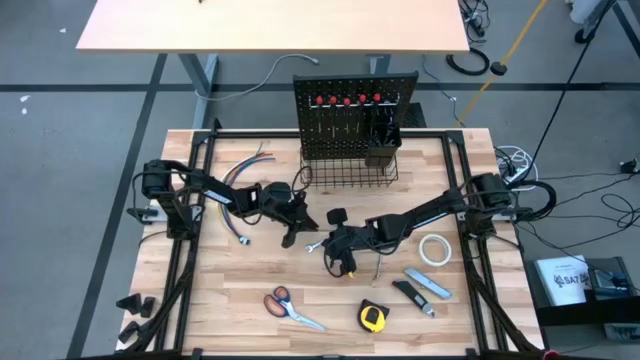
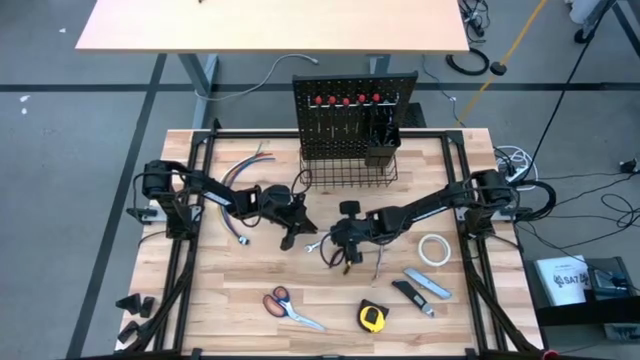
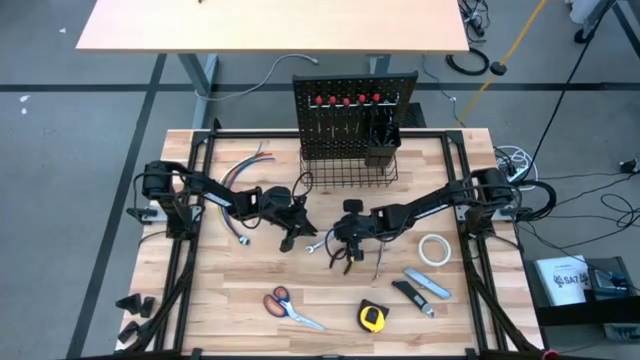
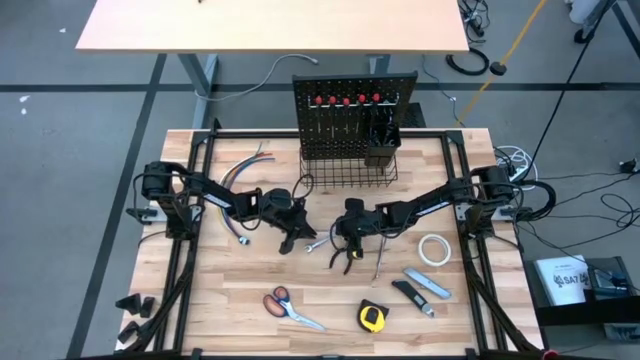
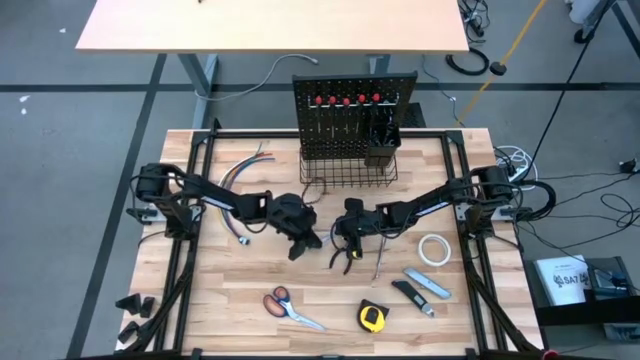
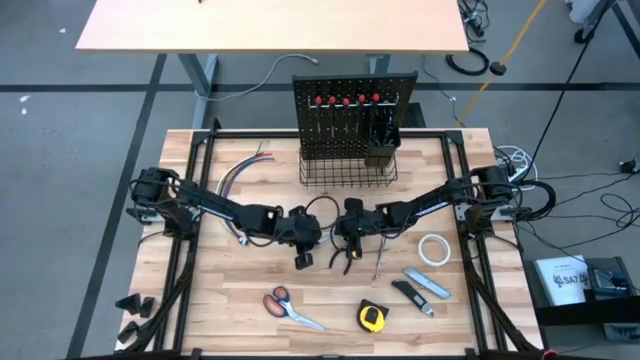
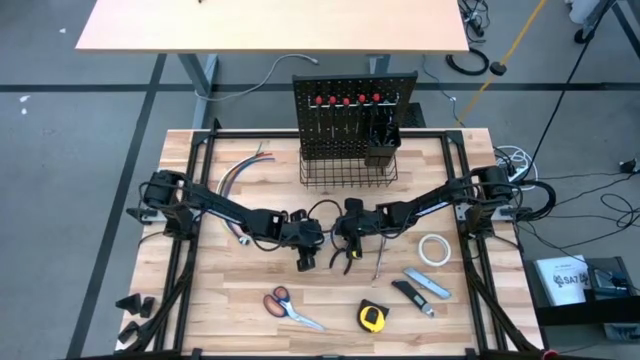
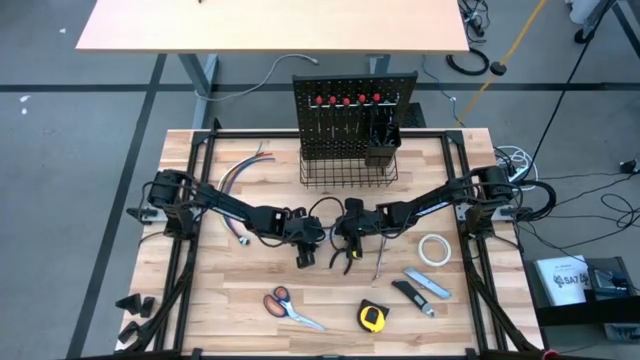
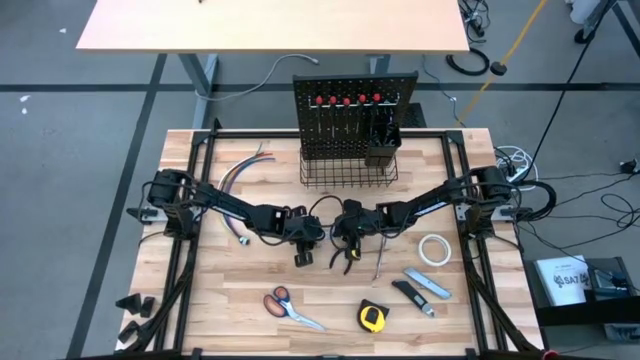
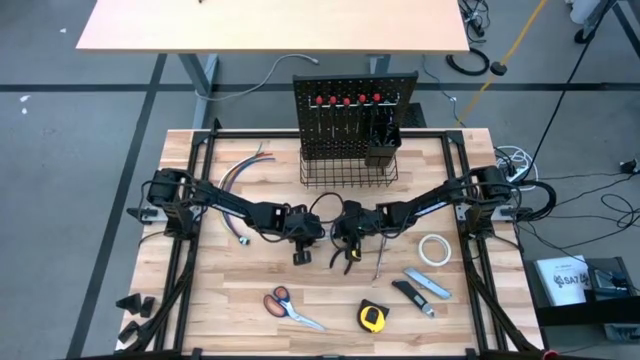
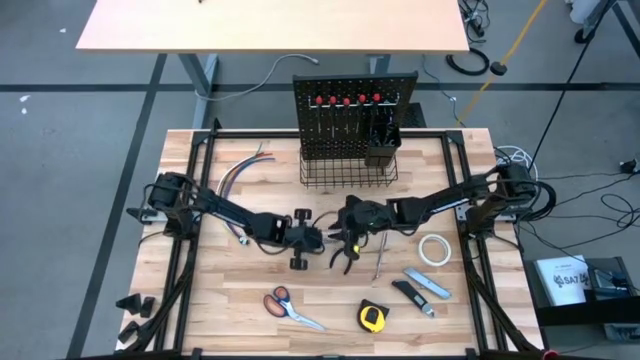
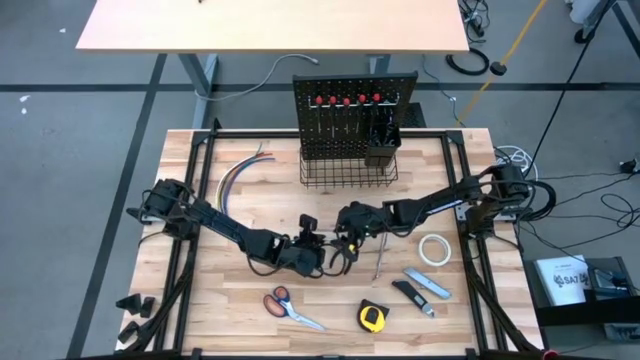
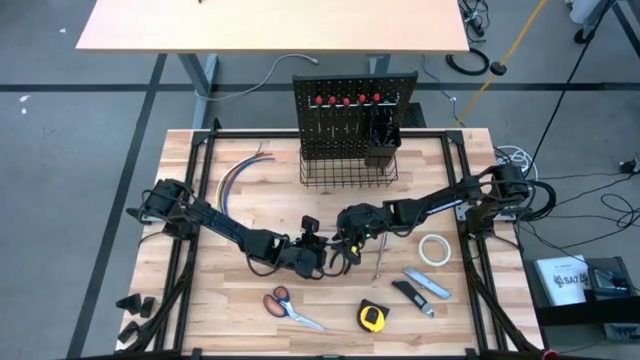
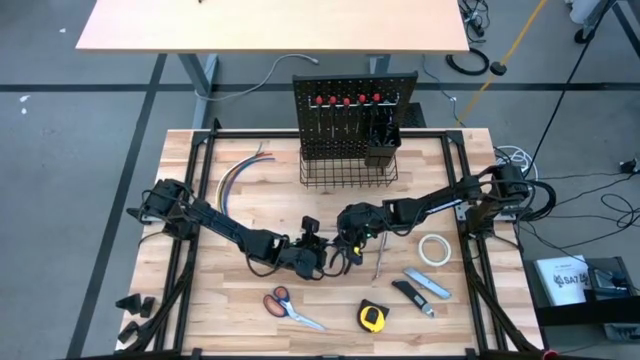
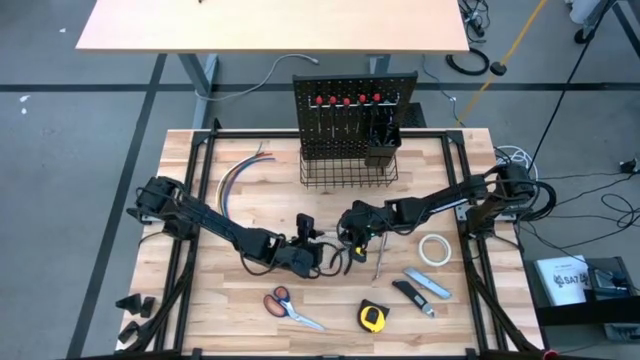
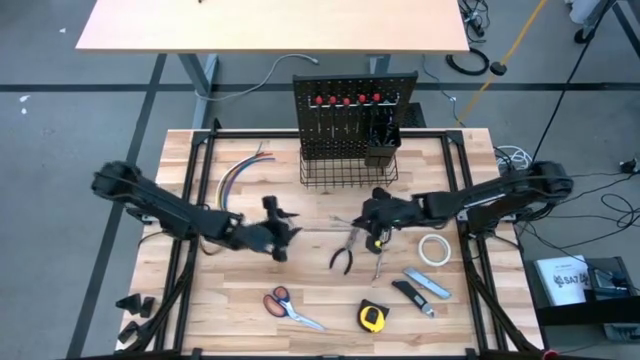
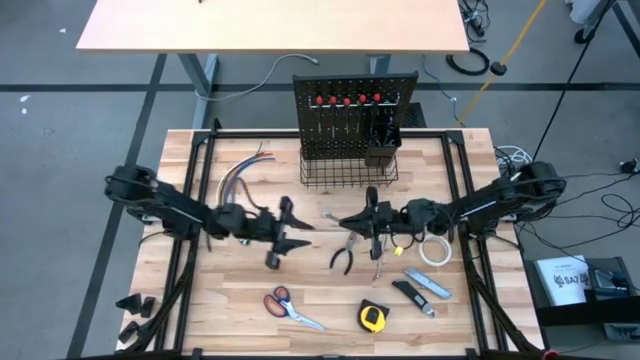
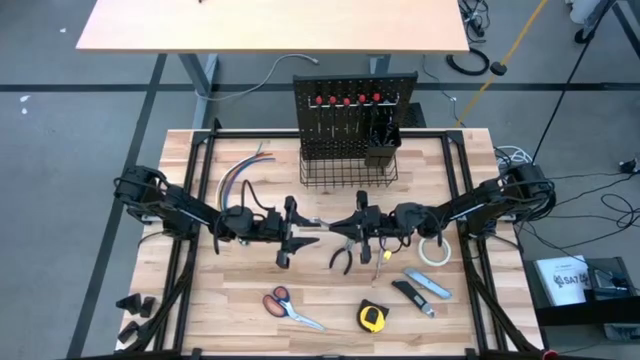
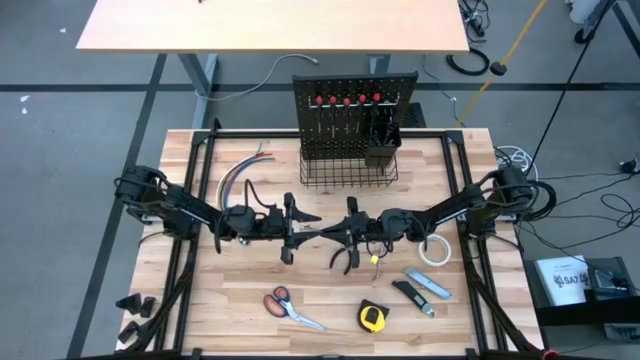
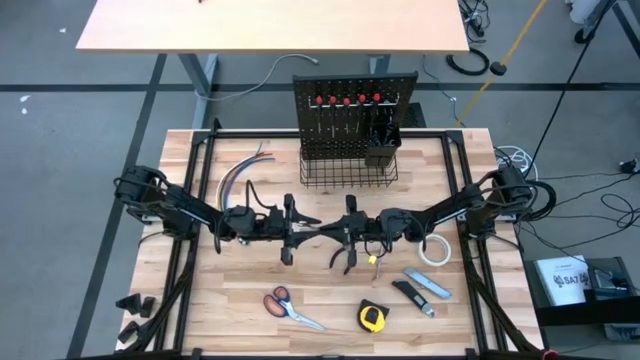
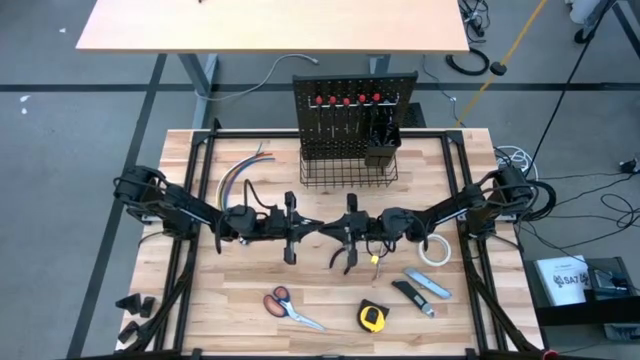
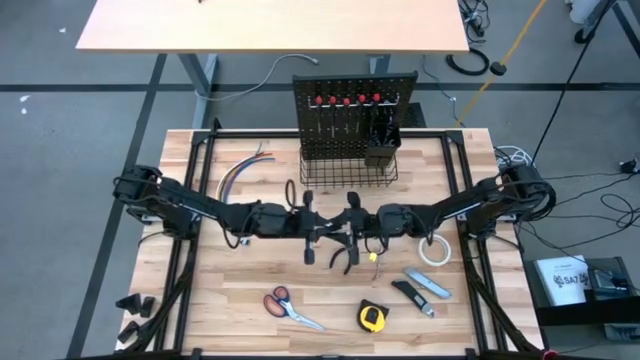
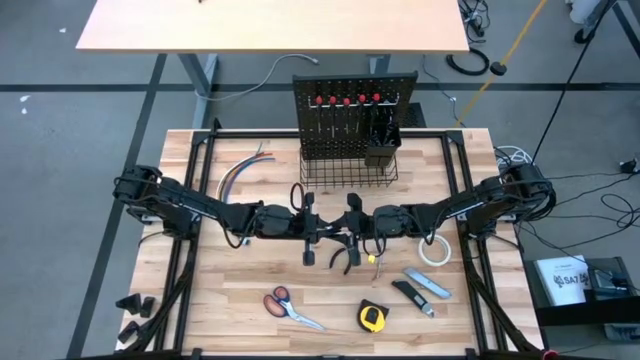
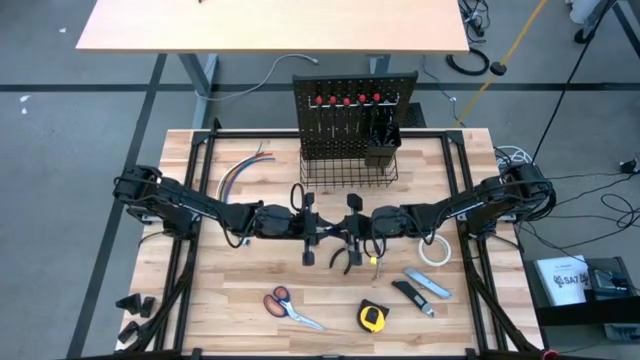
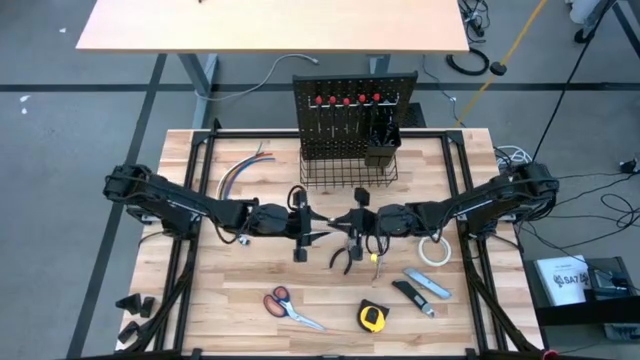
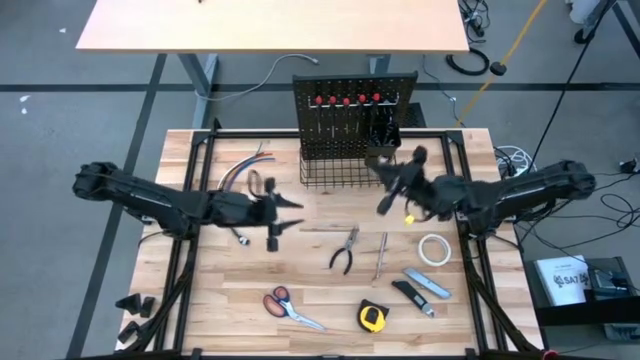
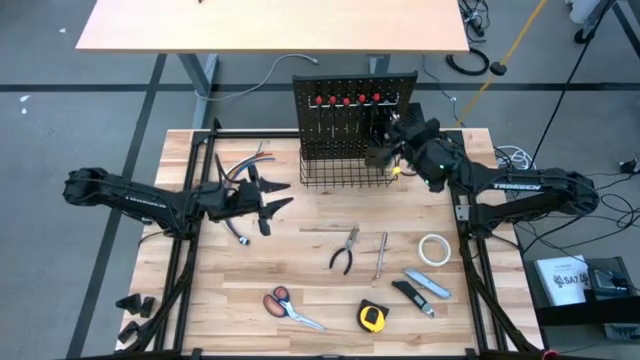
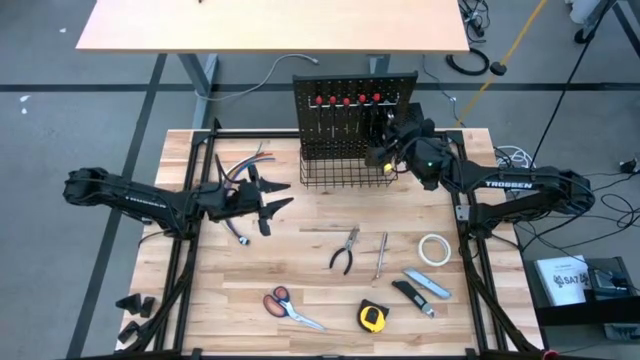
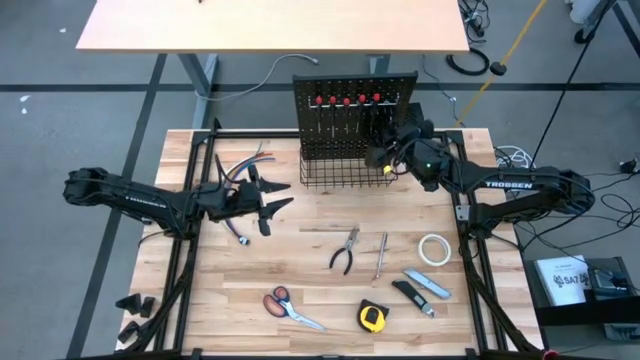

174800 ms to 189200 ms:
Task: Hang tools onto peg board
Put the wrench into the black bin on the pegboard

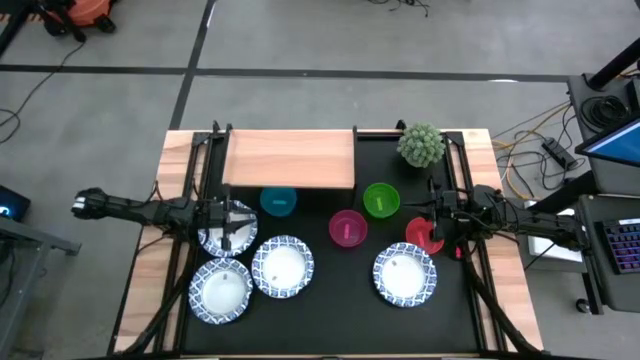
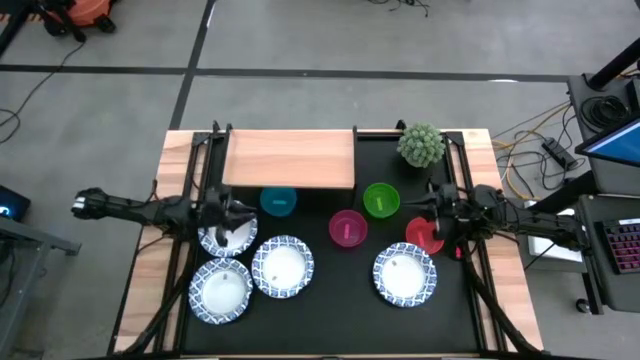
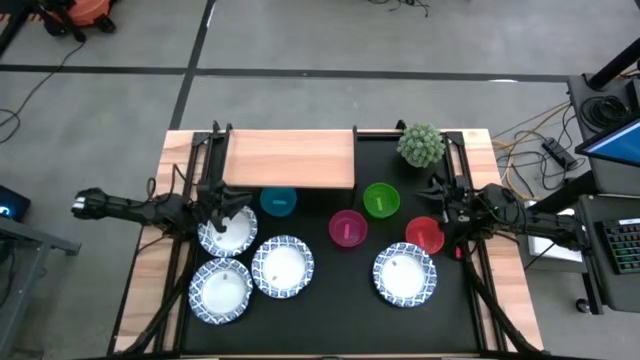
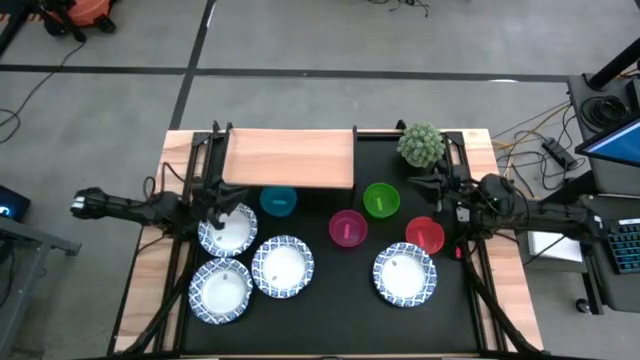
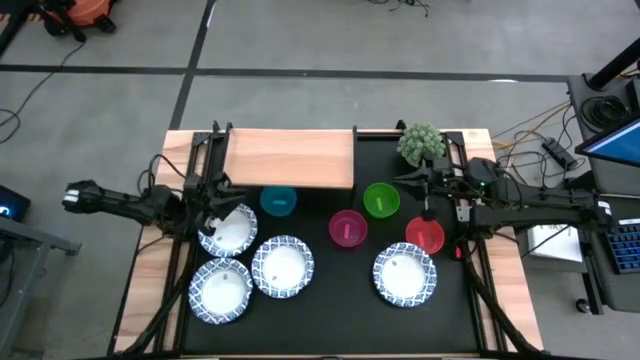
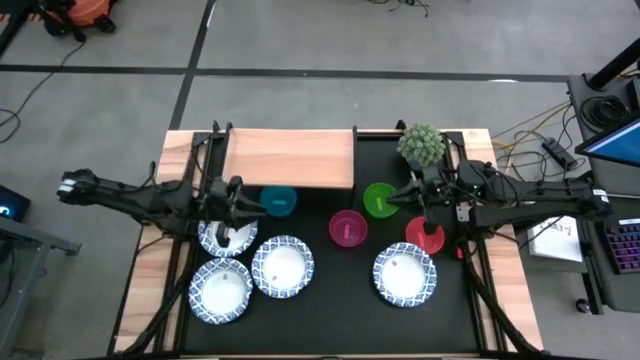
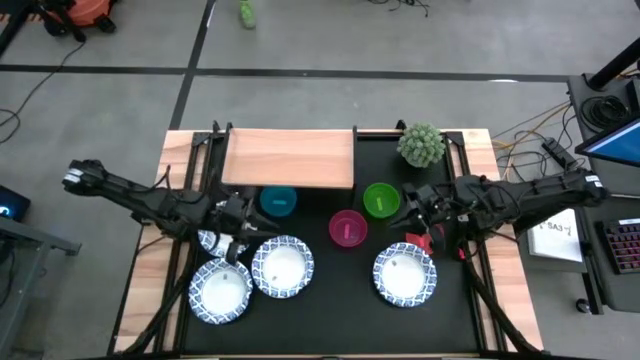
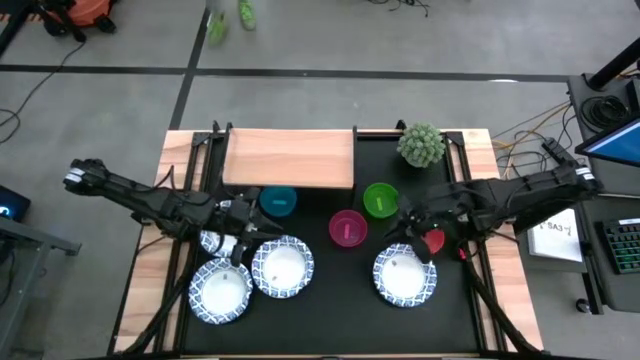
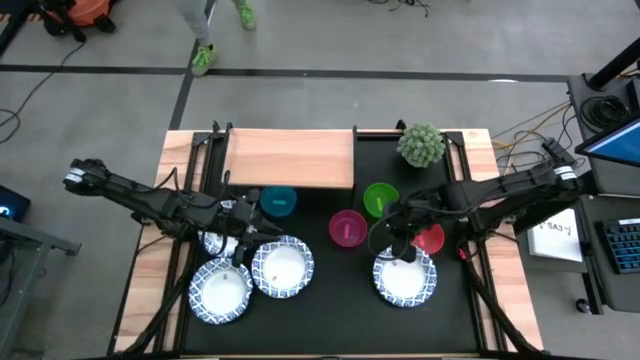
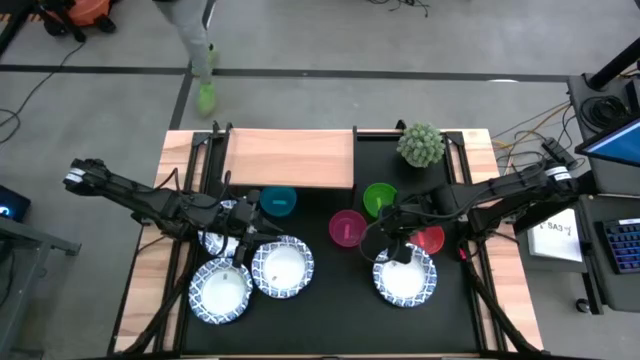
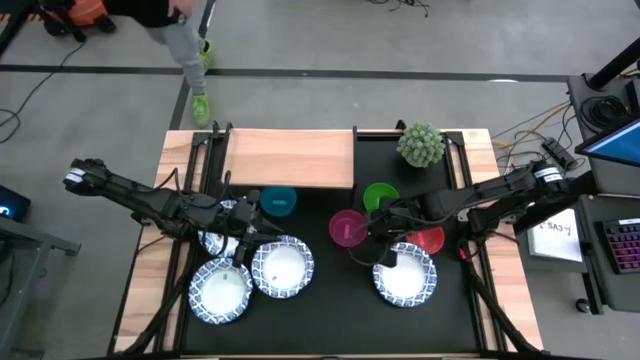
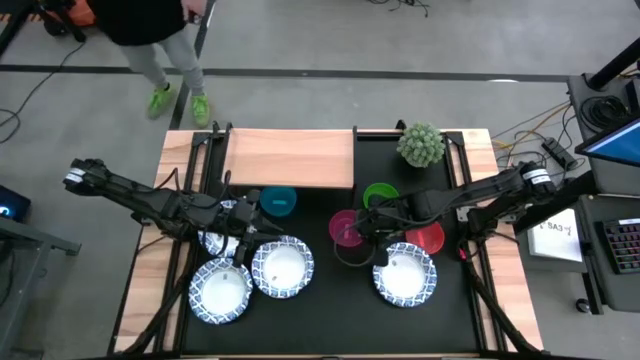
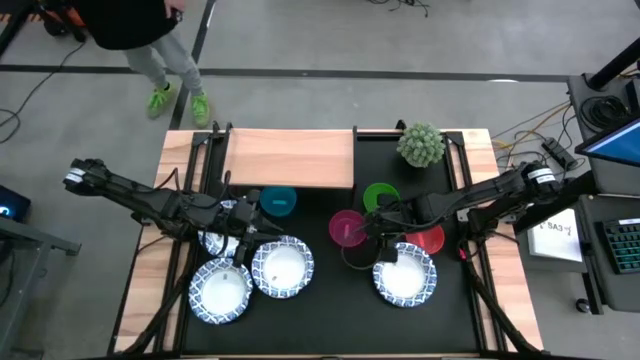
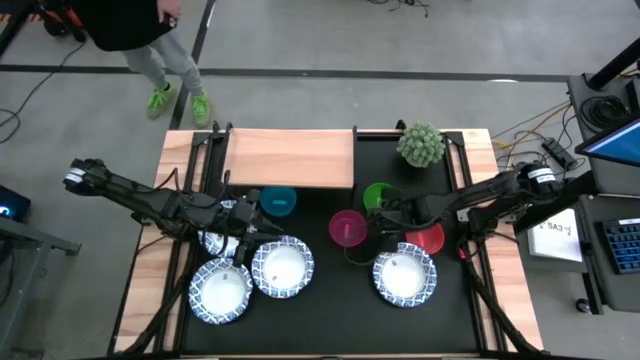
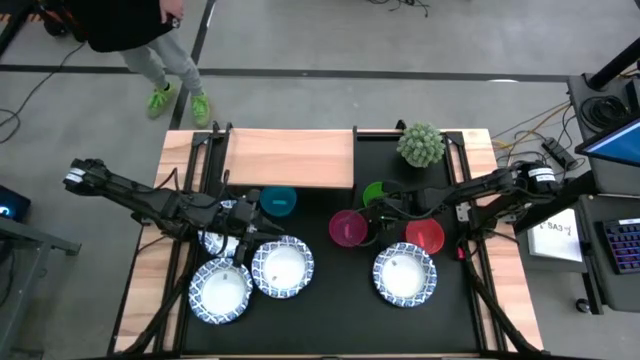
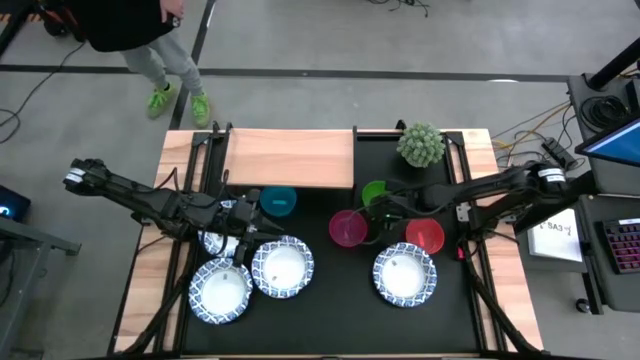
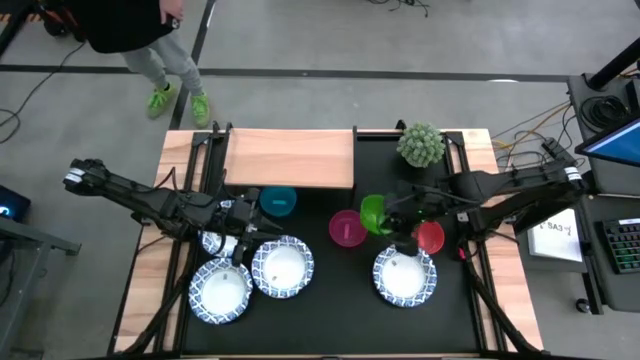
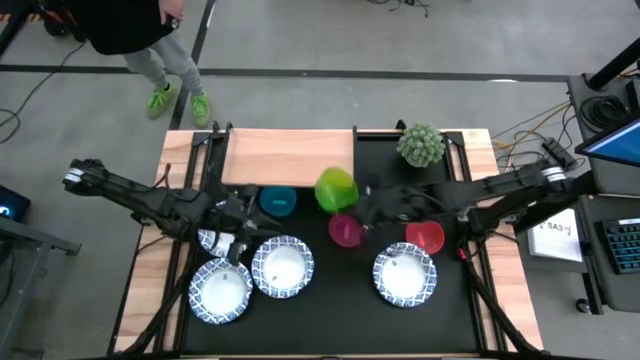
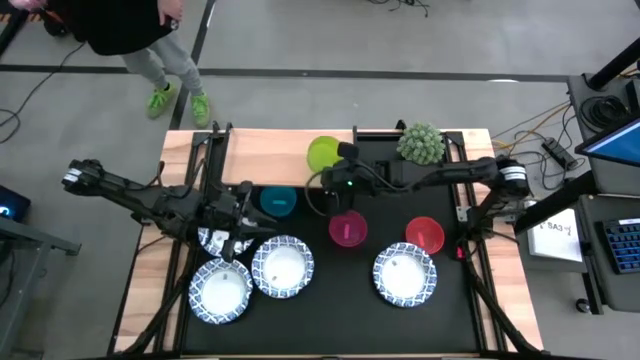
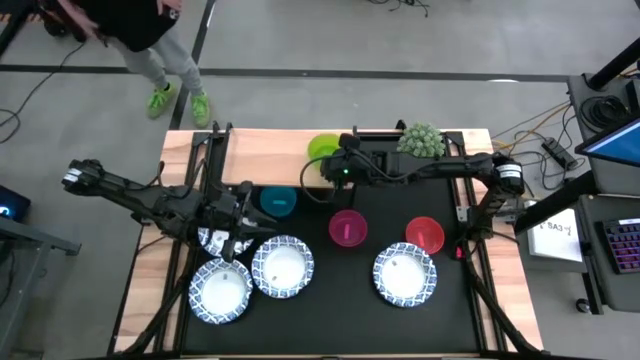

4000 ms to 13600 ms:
Task: Place and stack bowls onto a shelf
Put the green bowl on the shelf
